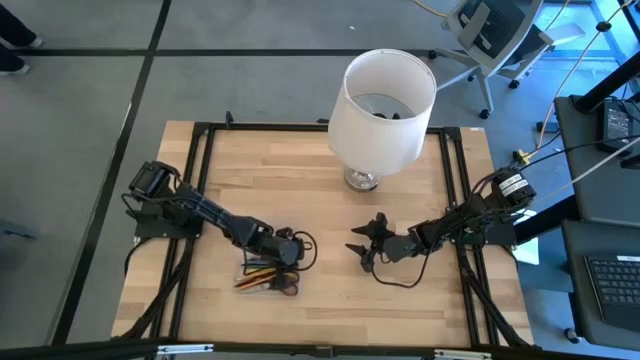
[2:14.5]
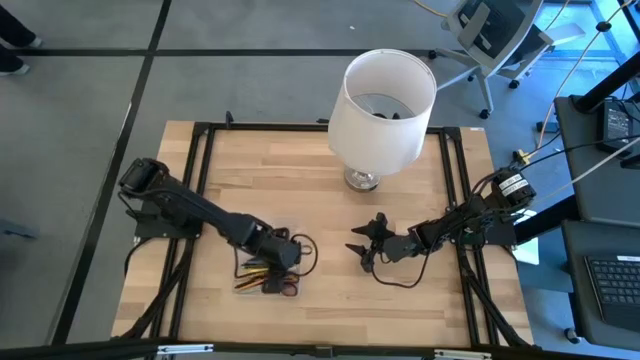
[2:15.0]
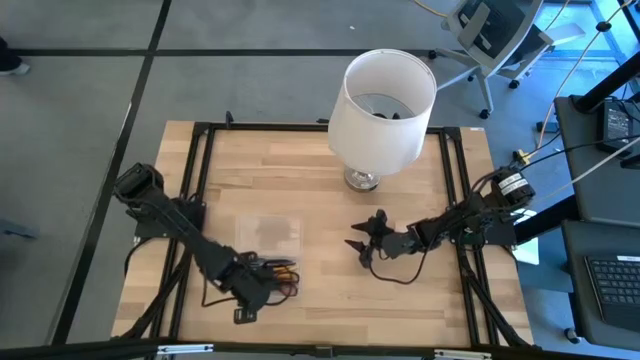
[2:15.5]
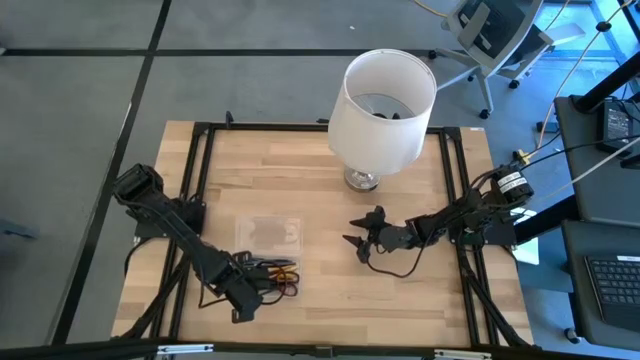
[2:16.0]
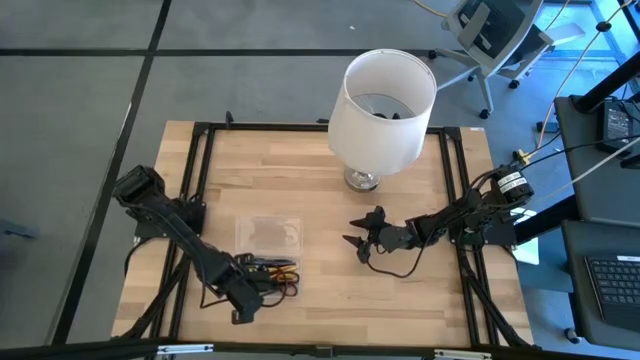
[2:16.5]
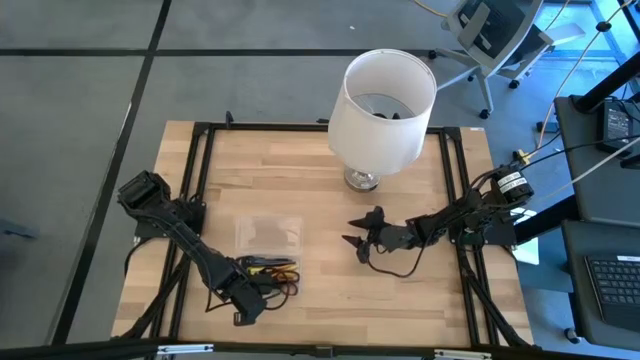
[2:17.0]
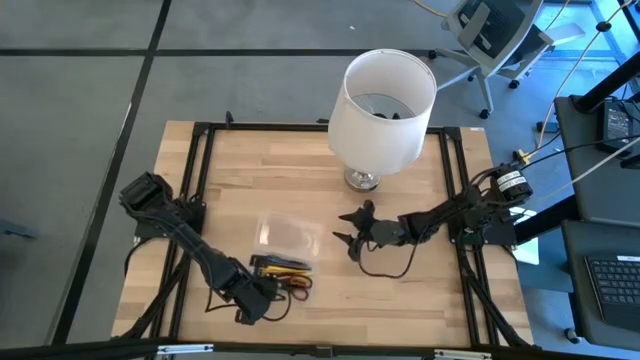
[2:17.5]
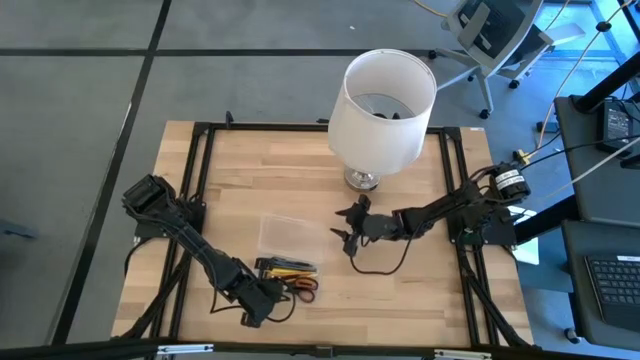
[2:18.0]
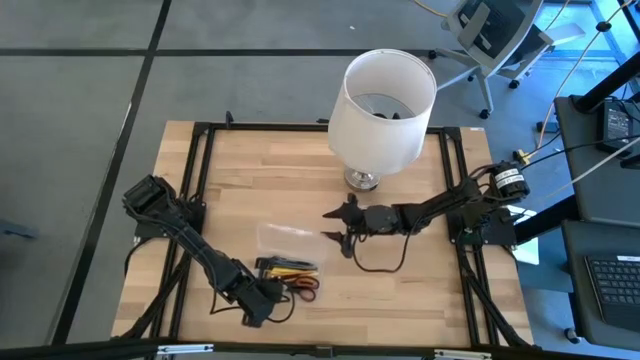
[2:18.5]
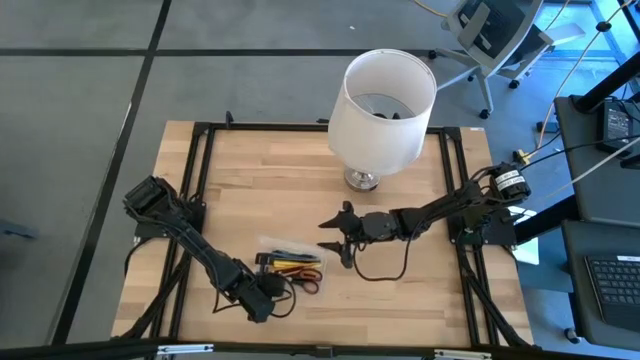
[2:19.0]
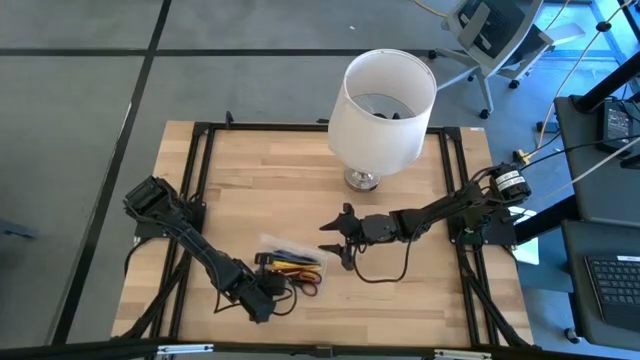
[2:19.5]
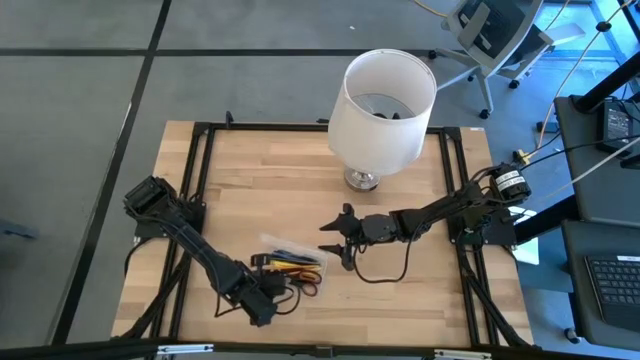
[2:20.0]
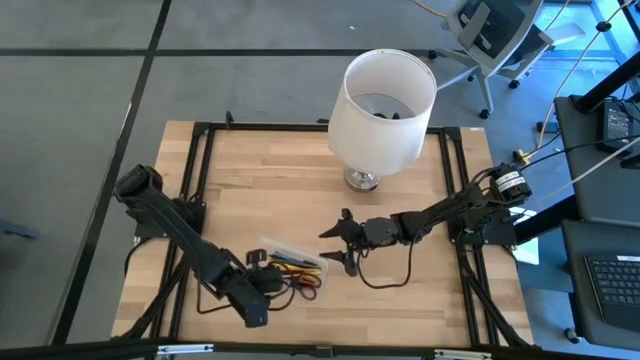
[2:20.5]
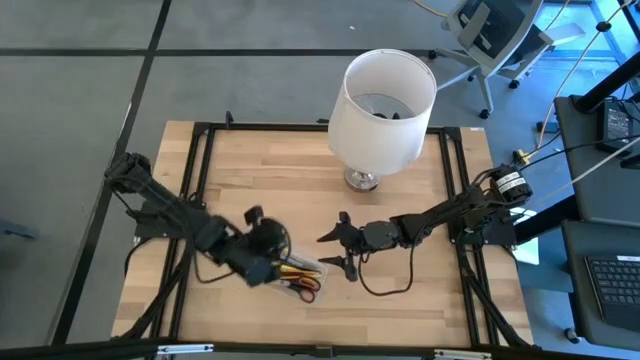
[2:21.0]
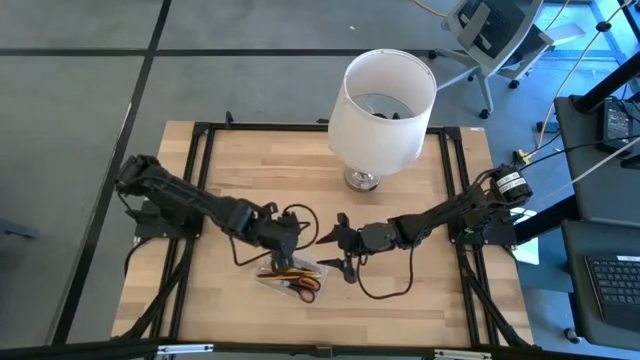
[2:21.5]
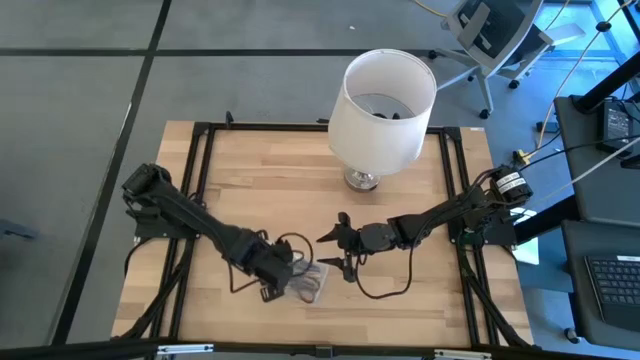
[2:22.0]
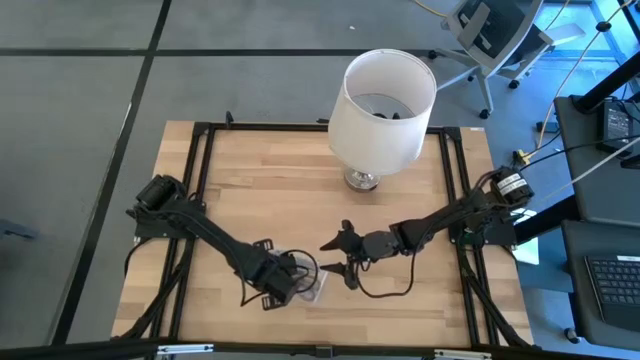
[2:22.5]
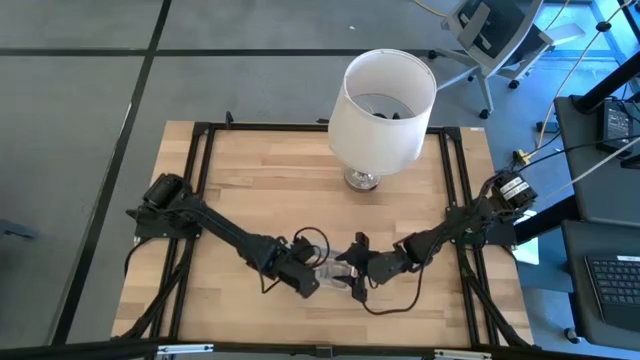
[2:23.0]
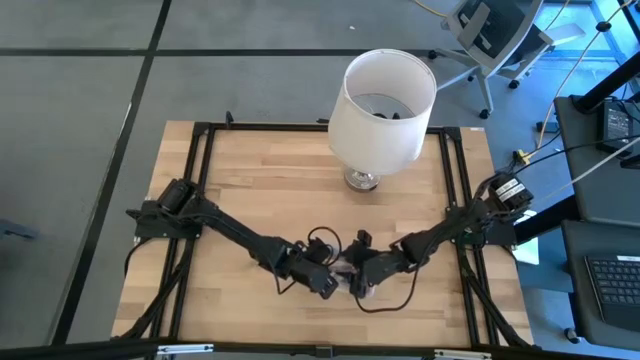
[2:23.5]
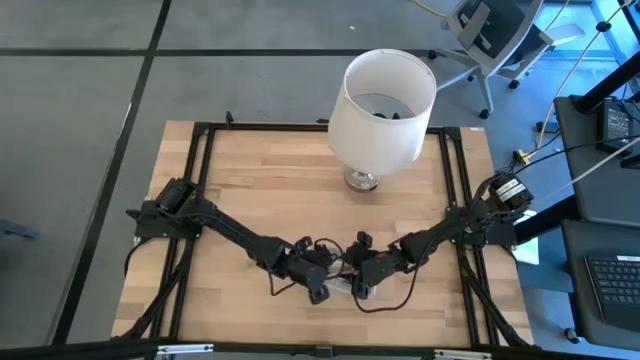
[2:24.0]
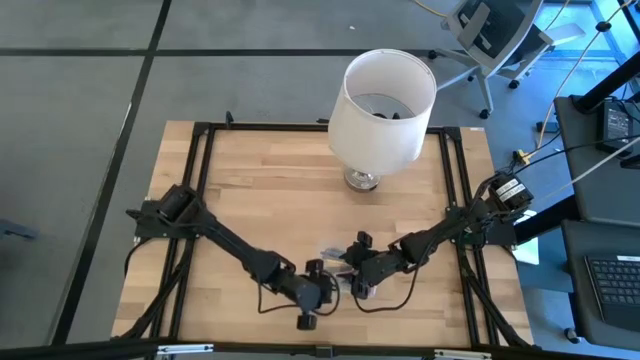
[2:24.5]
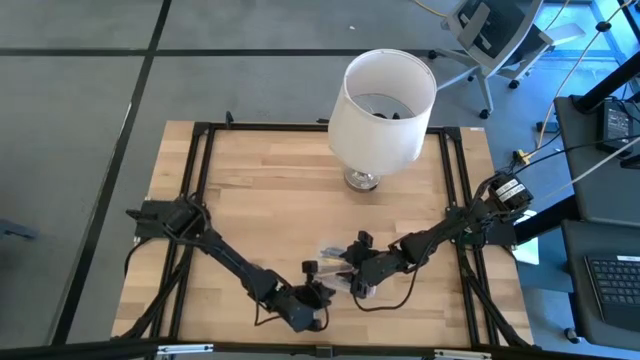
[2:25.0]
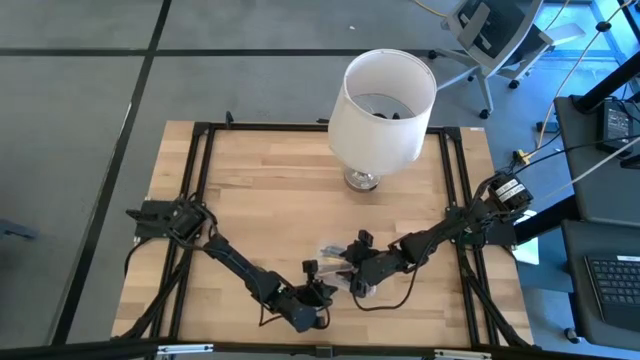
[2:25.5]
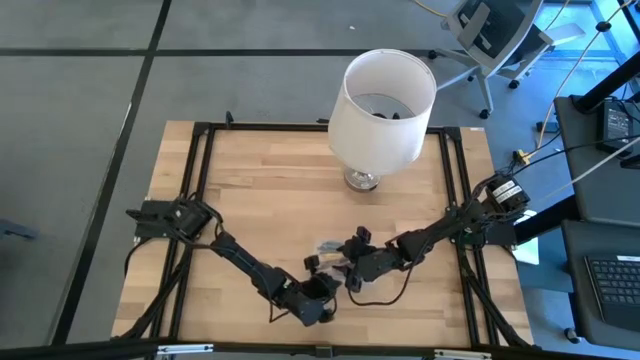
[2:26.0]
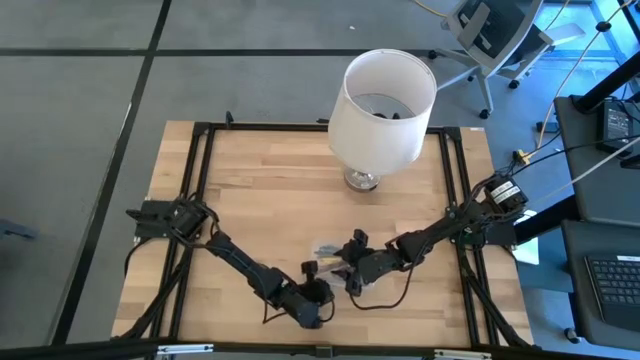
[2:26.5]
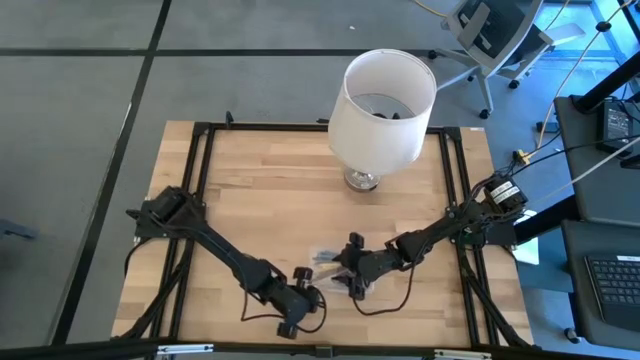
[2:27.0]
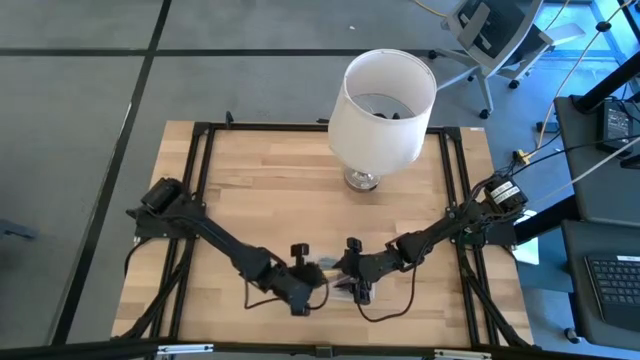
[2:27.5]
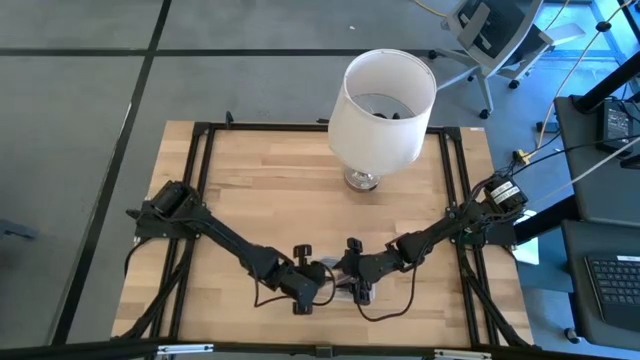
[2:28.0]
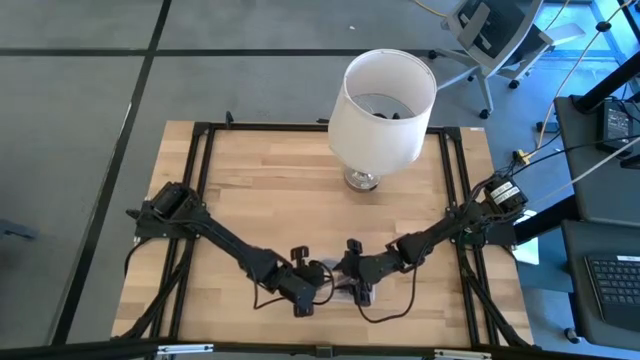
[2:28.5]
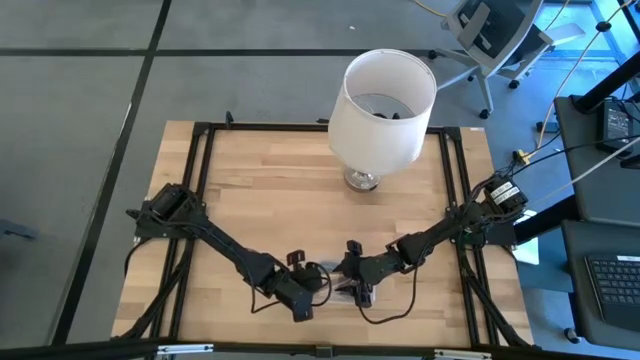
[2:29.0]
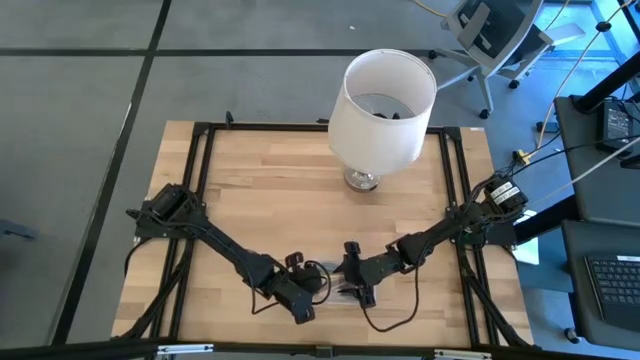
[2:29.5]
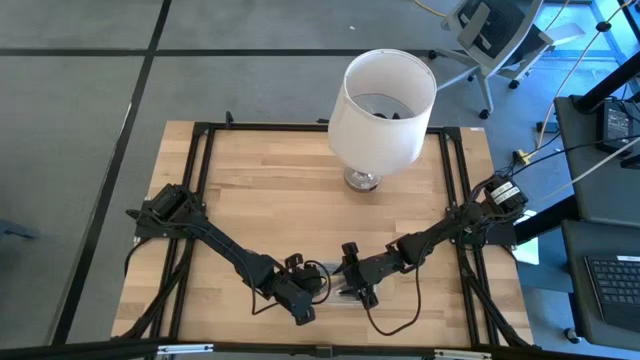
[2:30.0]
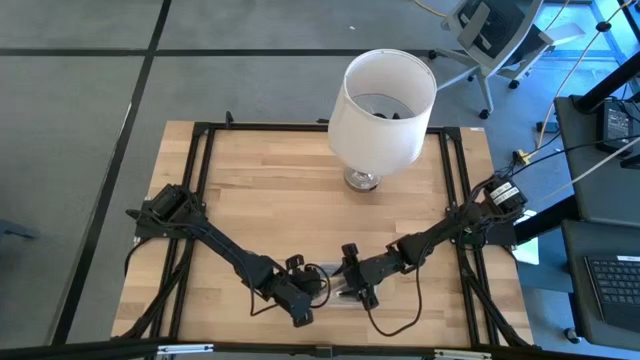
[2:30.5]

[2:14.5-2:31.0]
Task: Pick & place school supplies into a supply box
Close the transparent supply box
